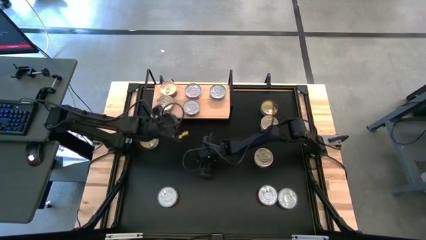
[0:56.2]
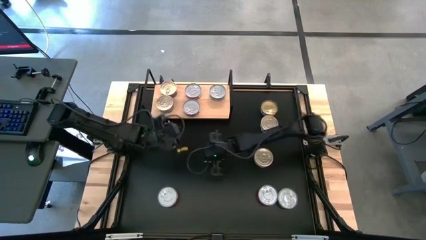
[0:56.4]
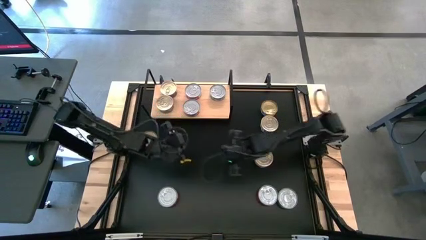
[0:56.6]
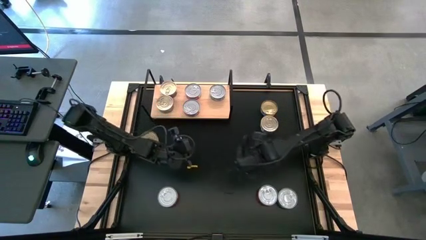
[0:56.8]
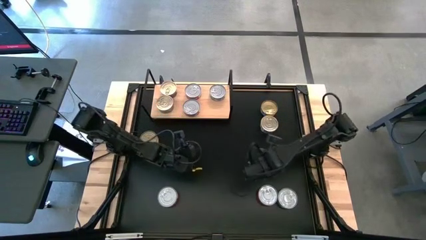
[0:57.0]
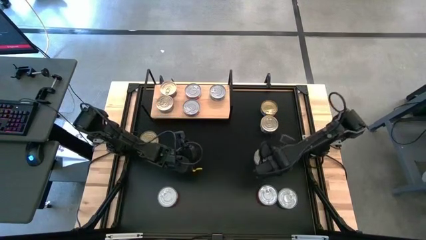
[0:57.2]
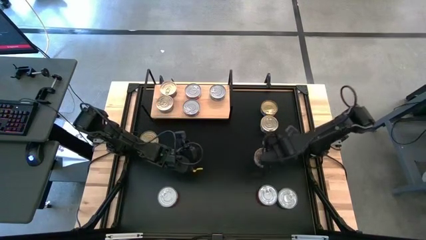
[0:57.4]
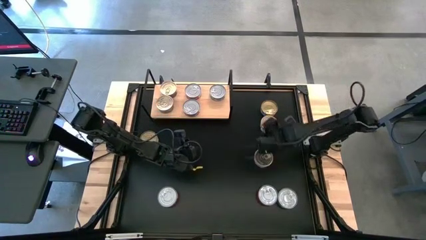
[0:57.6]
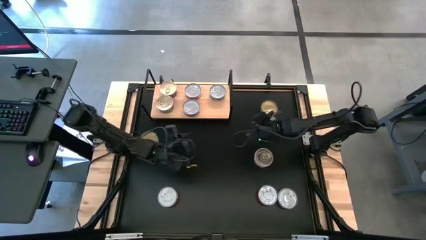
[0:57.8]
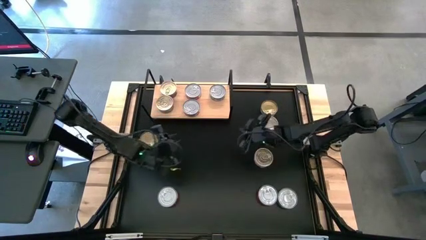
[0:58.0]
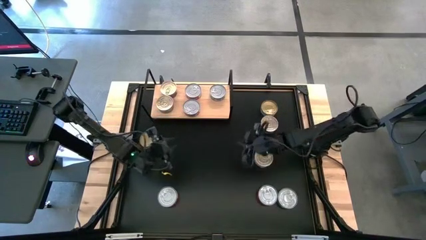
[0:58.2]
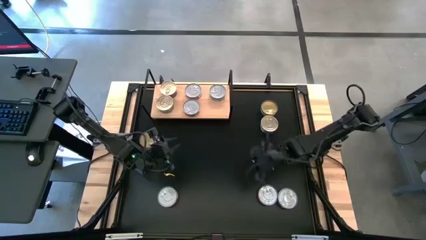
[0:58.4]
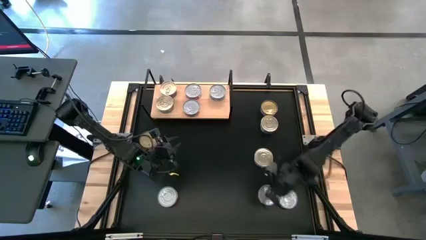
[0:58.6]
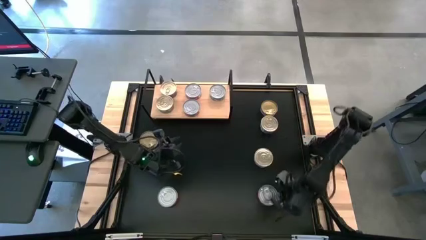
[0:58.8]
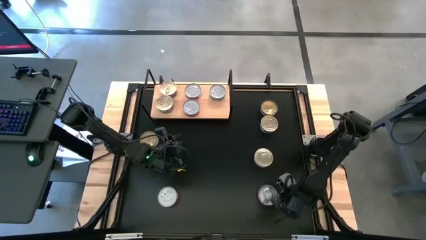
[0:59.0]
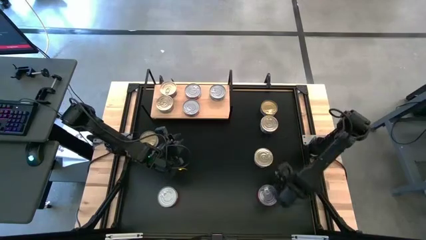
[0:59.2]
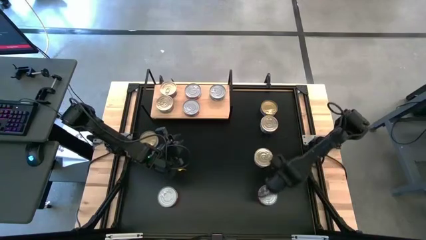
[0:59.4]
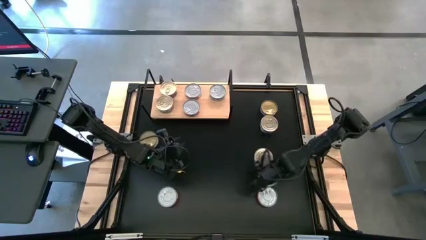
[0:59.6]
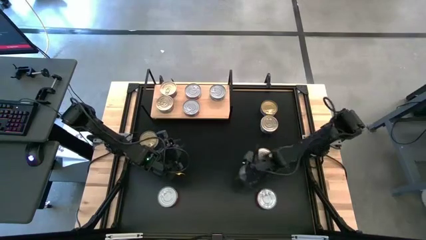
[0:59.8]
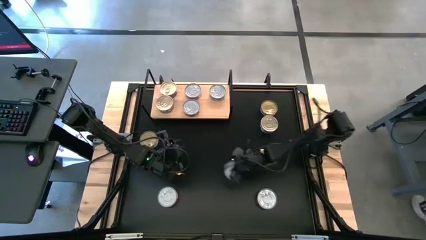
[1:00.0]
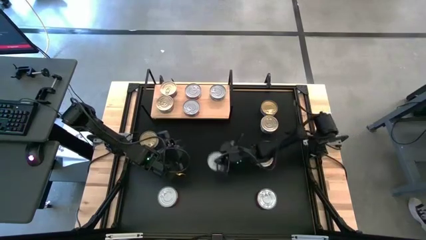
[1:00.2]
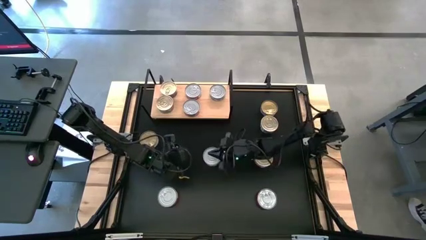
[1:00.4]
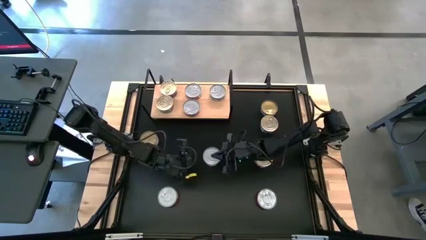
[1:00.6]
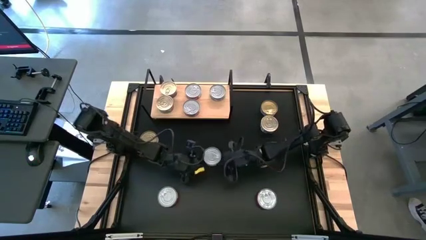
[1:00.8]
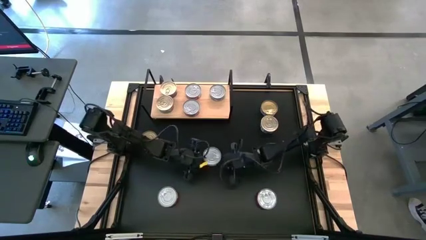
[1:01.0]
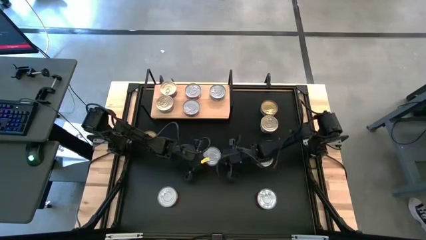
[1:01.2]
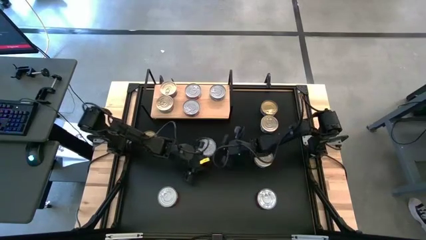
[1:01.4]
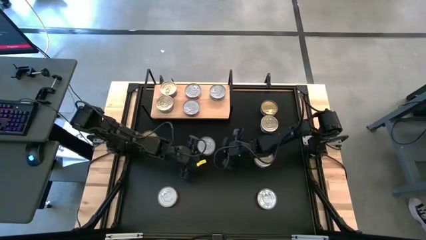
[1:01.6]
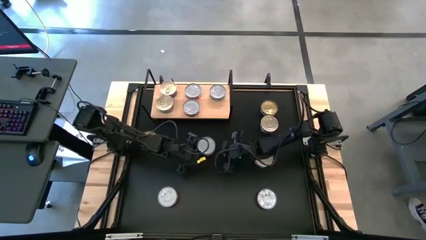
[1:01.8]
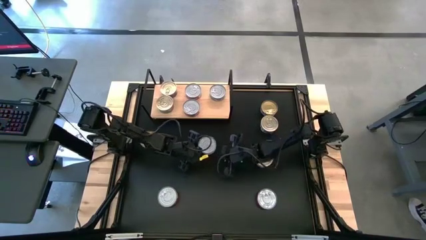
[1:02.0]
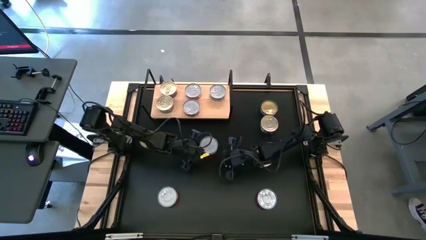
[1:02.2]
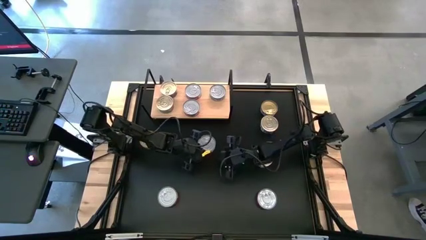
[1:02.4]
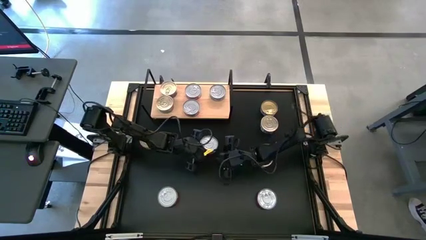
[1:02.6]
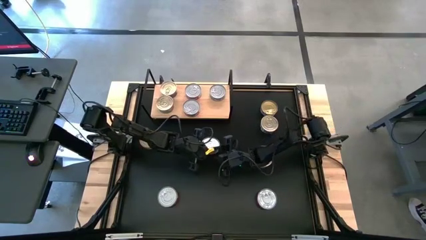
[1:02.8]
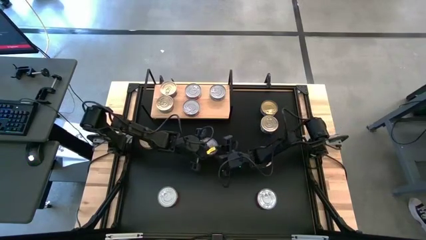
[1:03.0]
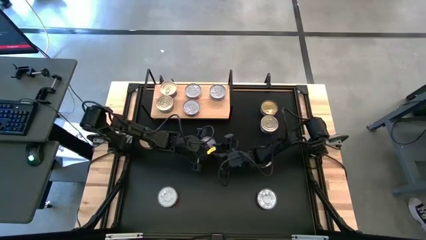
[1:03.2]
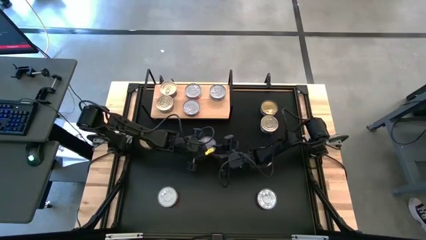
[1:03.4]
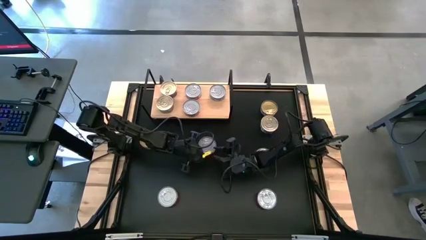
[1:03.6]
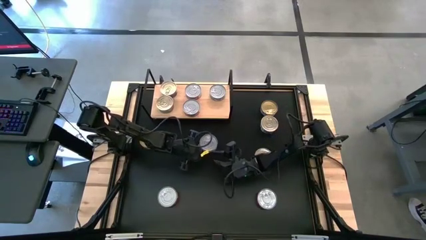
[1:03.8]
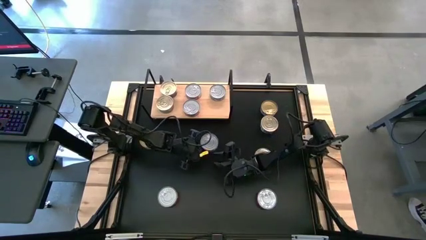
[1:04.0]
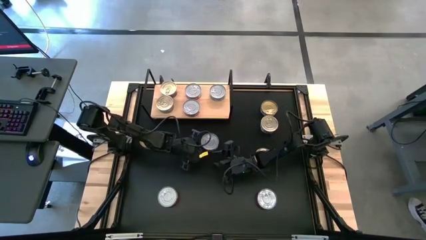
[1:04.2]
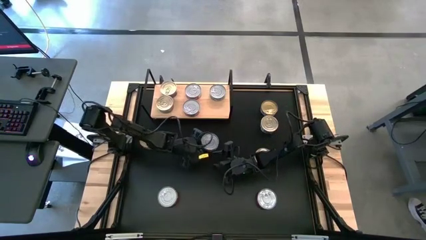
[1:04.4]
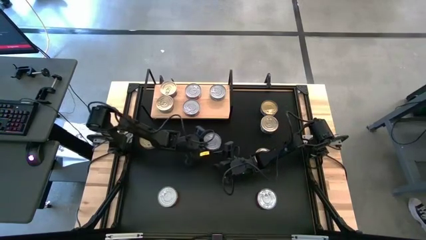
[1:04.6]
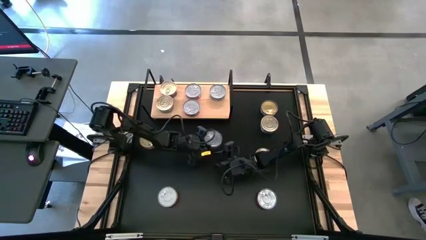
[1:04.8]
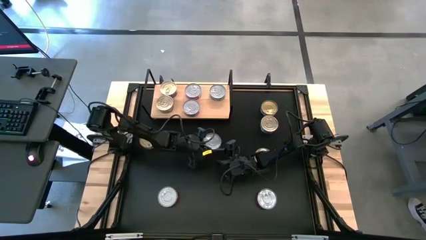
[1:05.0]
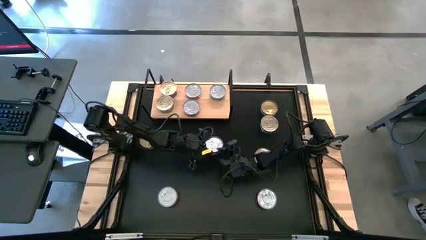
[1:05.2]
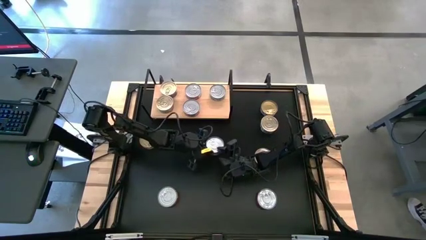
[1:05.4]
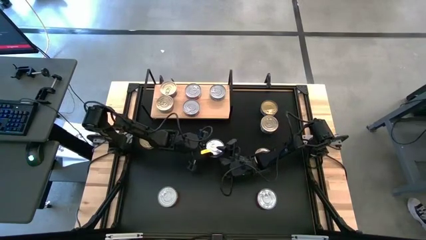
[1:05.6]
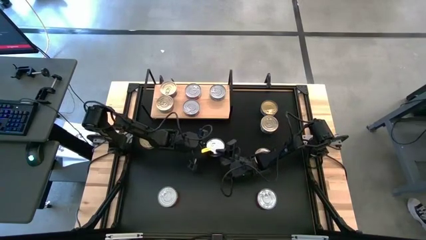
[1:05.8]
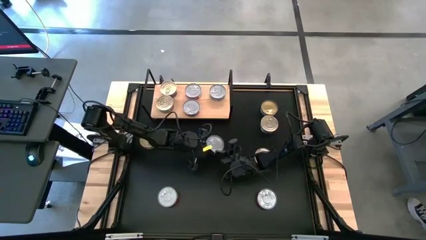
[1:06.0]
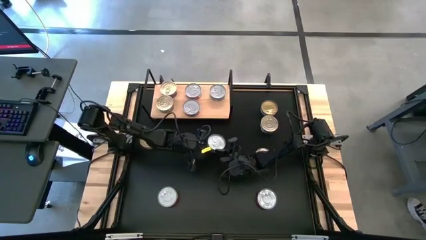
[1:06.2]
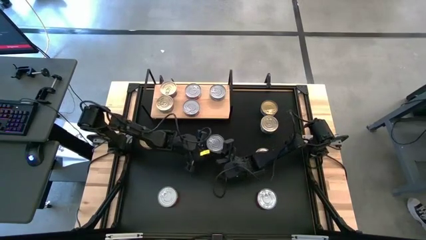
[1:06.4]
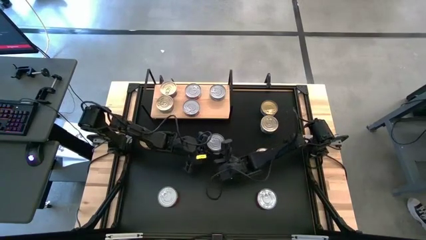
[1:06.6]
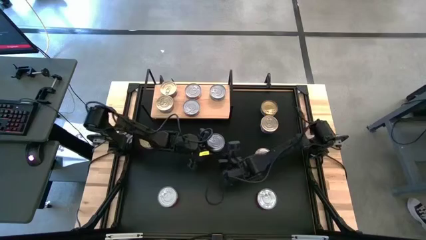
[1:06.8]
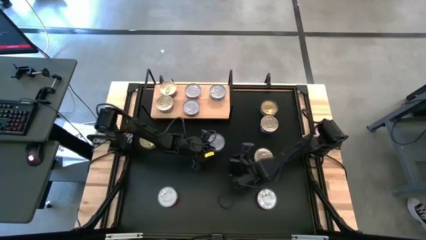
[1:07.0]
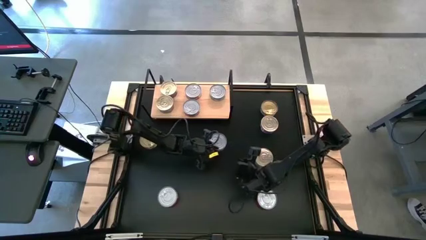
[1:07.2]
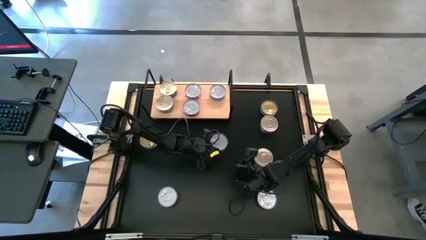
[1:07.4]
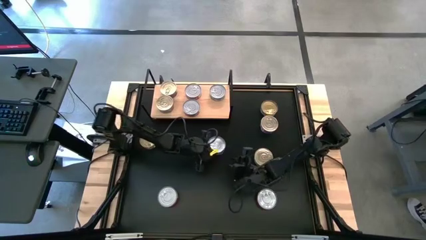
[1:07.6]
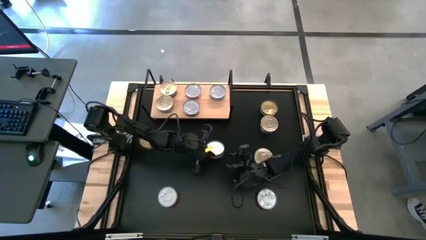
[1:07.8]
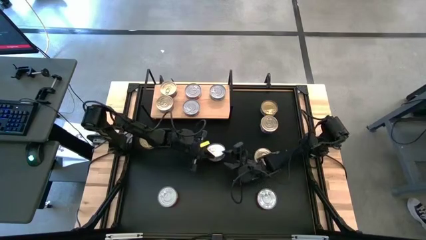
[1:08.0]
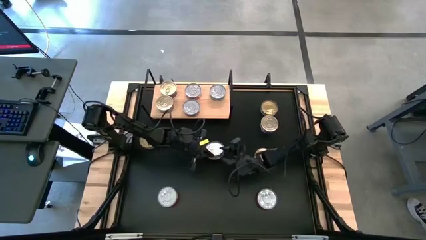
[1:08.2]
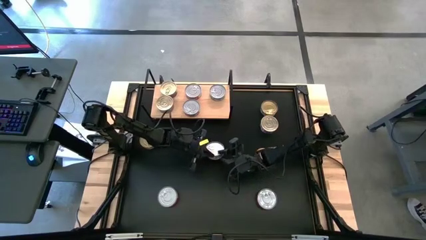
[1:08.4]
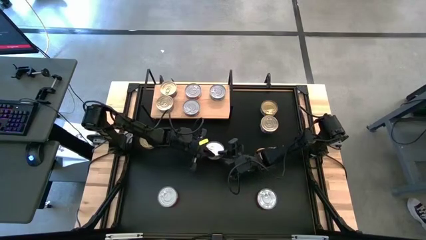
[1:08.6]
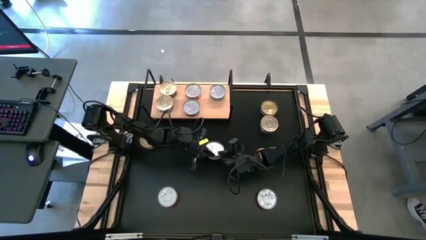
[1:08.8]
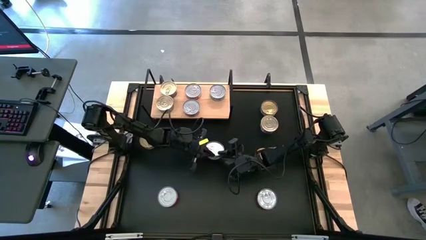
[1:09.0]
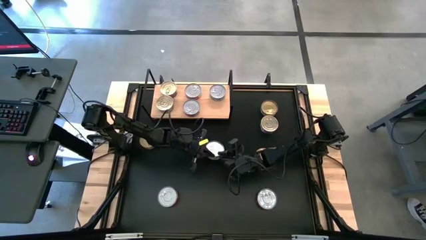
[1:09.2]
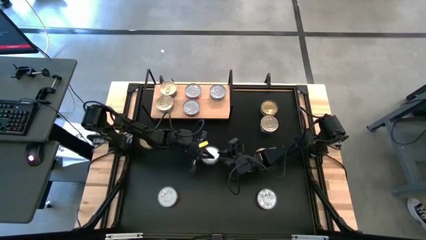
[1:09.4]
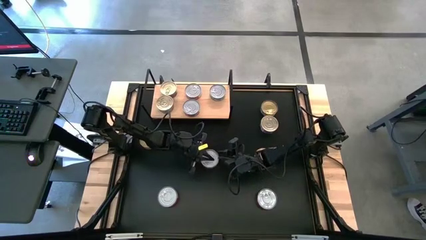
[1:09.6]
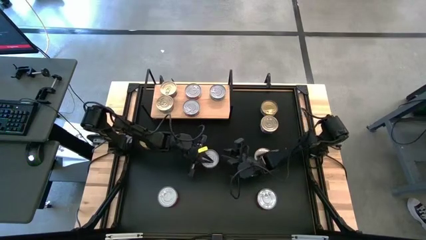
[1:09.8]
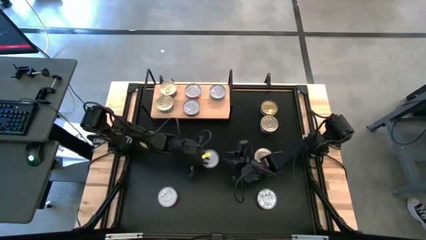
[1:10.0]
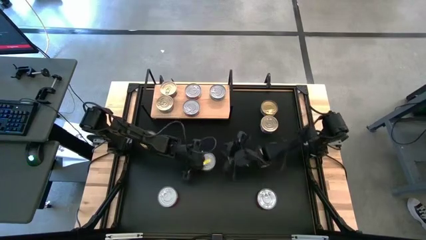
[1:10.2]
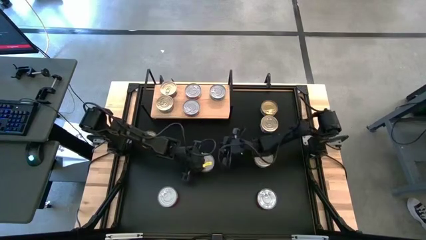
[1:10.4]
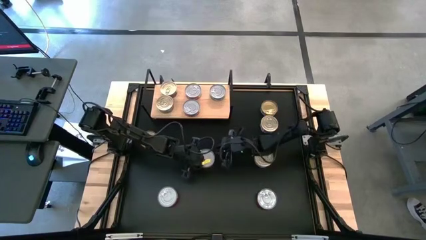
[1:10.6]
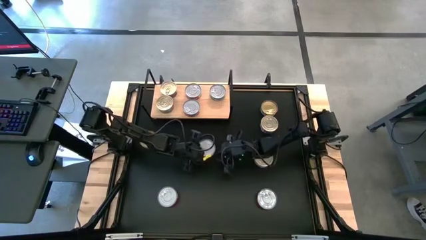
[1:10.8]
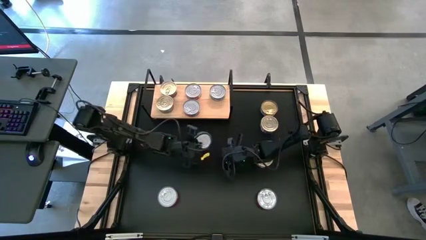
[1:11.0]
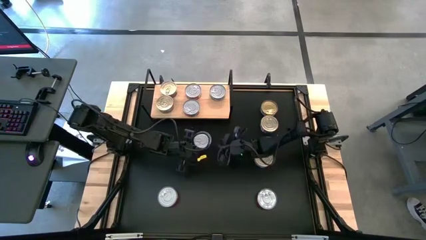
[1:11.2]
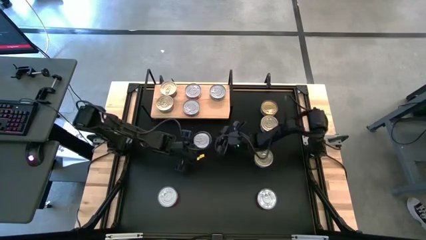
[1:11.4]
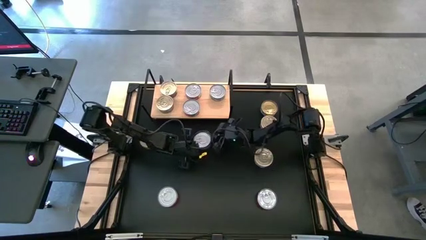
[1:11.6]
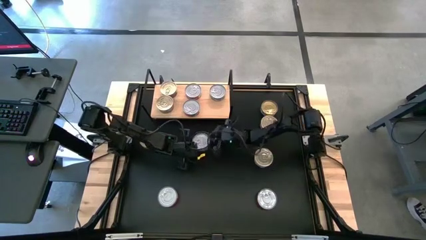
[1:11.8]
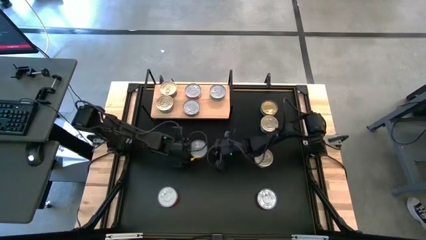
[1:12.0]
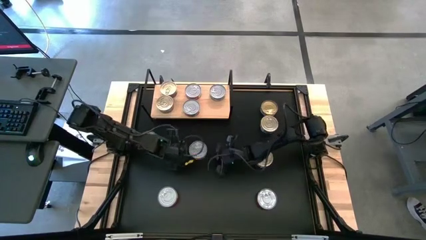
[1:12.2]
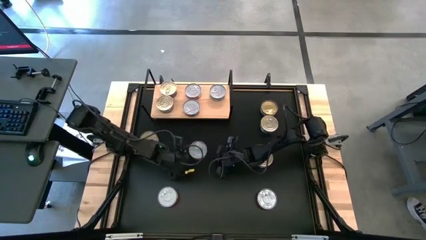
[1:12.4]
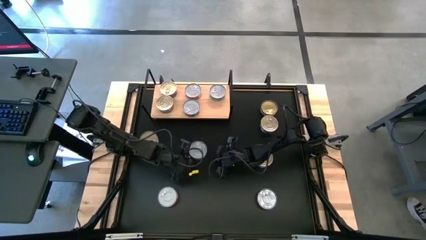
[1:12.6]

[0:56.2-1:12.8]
Task: Stack canned seafood by type on shelf
Put the bottom right green tuna can on the shelf and align it with the other green tuna can
